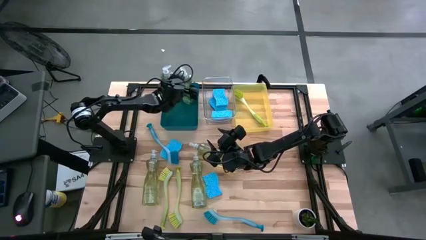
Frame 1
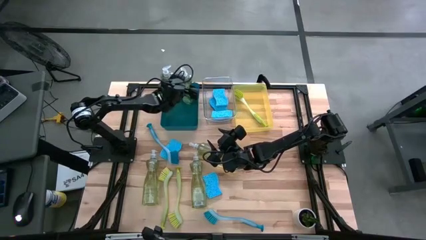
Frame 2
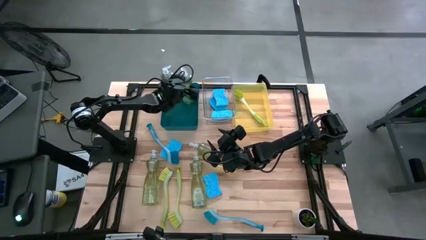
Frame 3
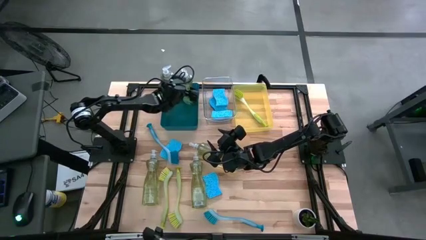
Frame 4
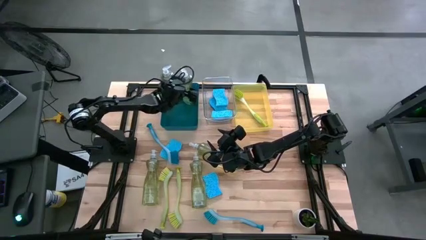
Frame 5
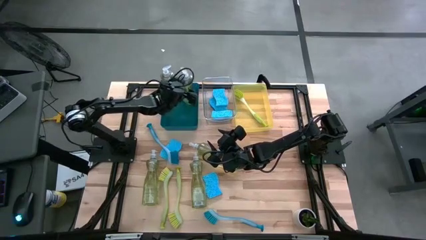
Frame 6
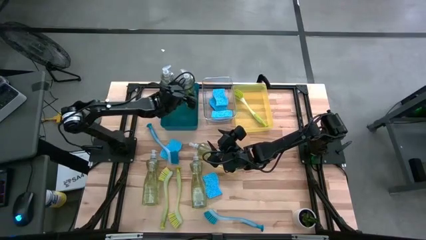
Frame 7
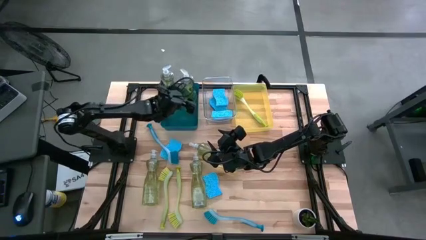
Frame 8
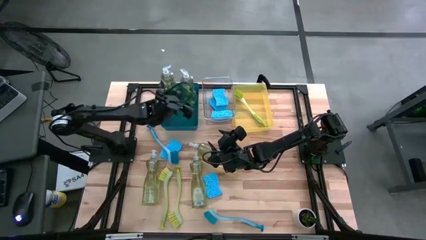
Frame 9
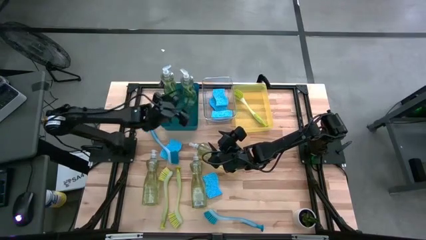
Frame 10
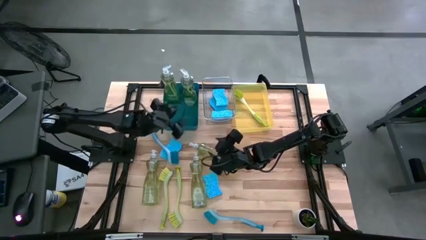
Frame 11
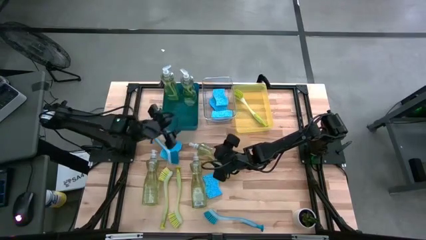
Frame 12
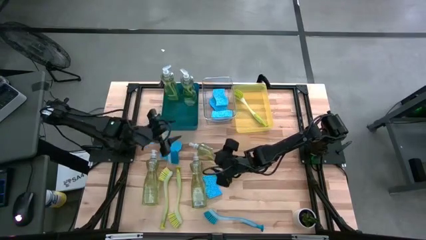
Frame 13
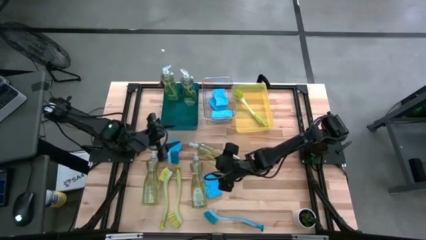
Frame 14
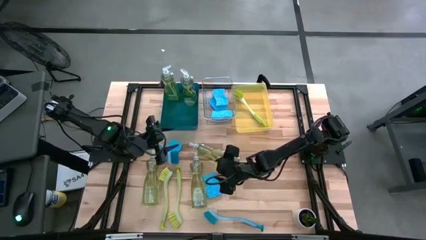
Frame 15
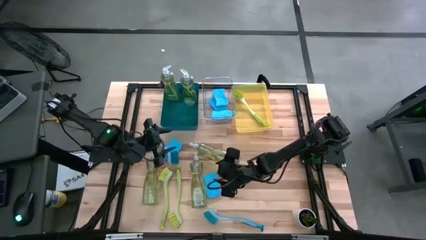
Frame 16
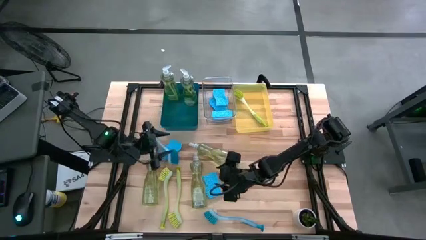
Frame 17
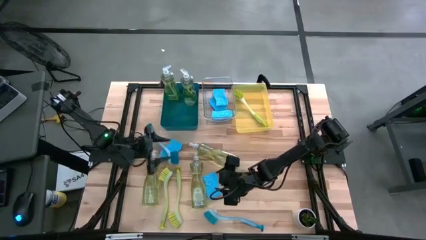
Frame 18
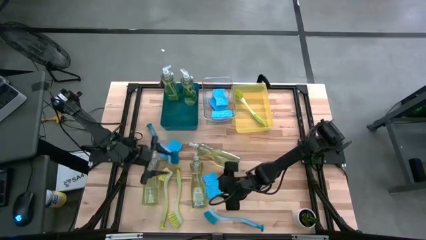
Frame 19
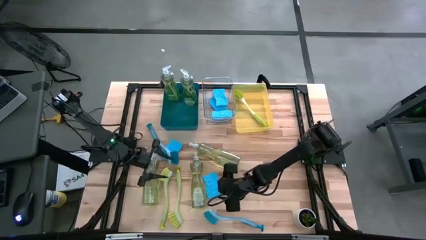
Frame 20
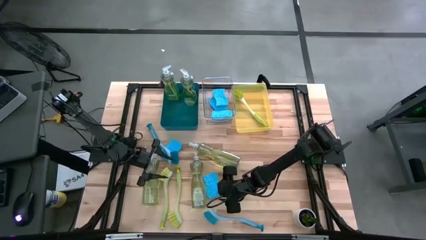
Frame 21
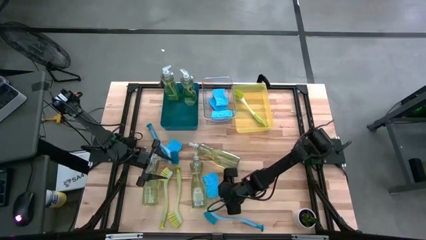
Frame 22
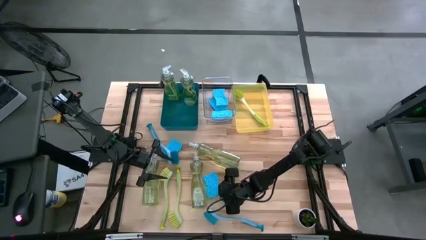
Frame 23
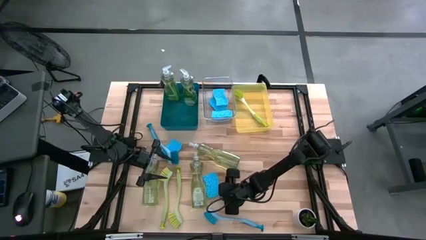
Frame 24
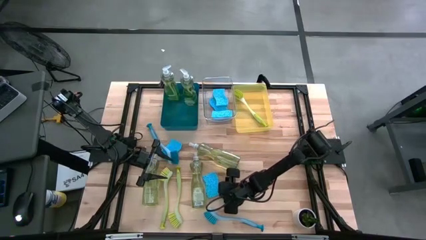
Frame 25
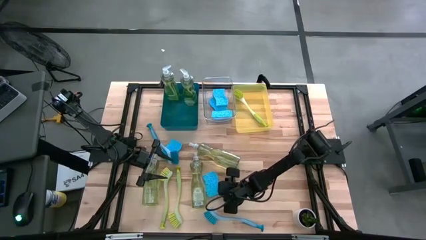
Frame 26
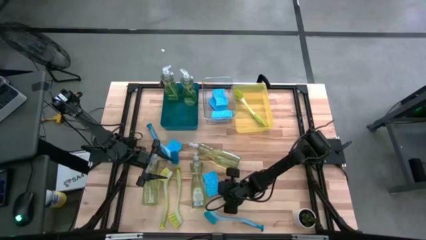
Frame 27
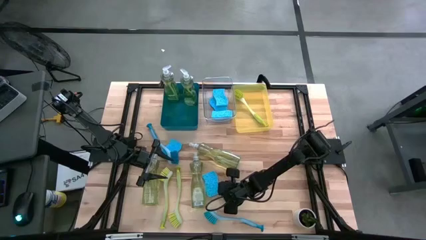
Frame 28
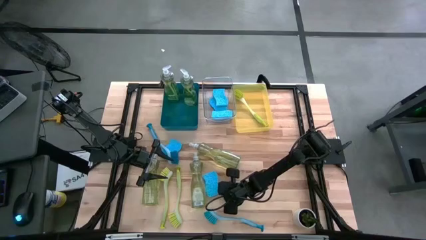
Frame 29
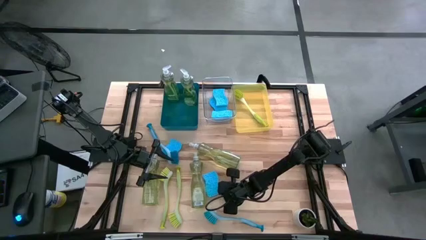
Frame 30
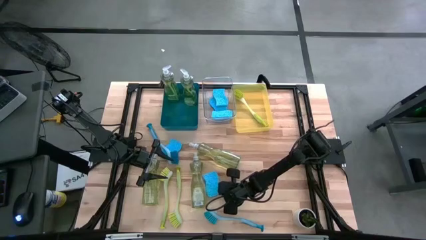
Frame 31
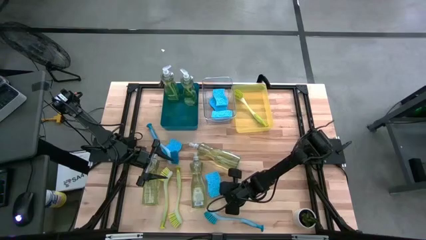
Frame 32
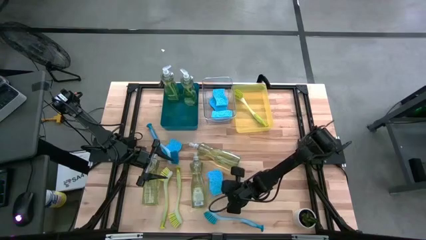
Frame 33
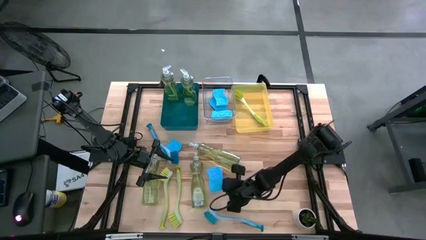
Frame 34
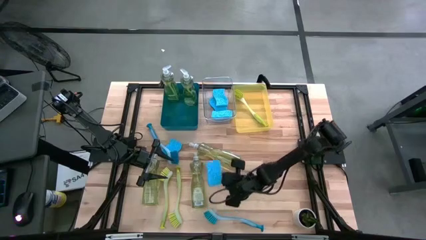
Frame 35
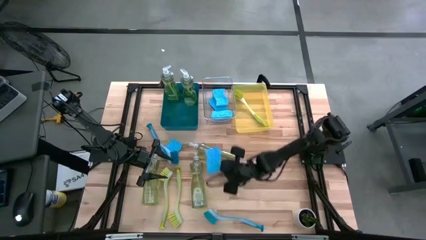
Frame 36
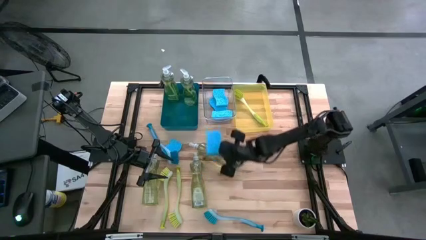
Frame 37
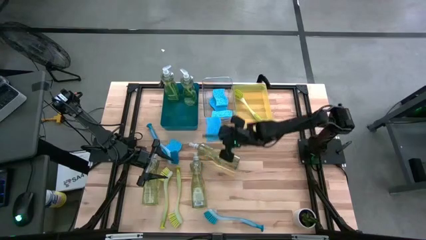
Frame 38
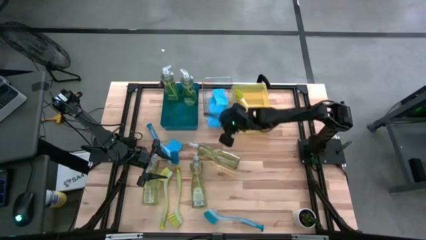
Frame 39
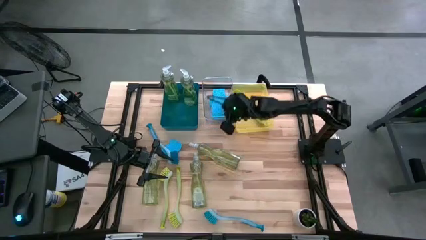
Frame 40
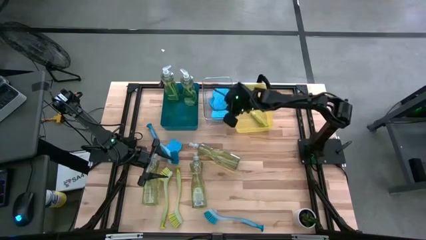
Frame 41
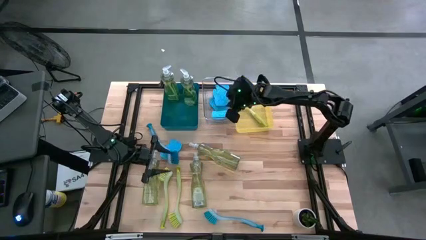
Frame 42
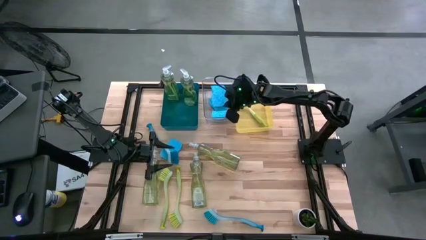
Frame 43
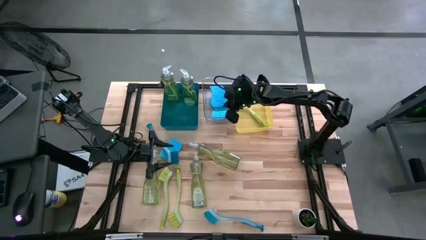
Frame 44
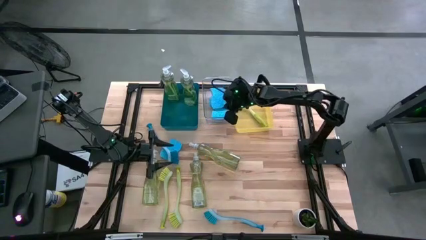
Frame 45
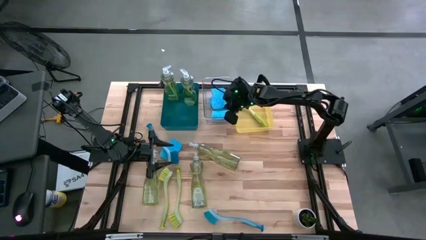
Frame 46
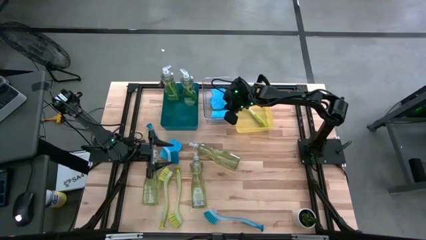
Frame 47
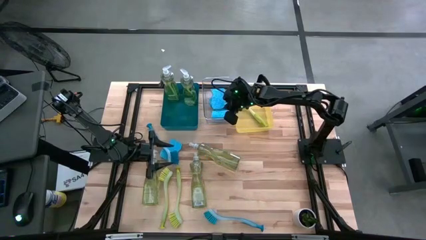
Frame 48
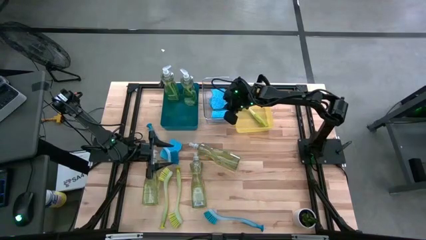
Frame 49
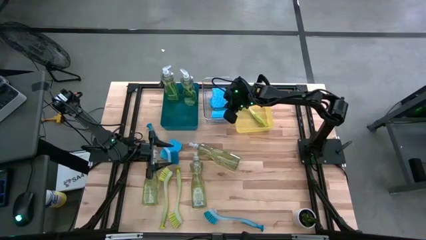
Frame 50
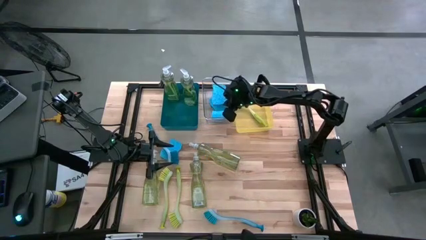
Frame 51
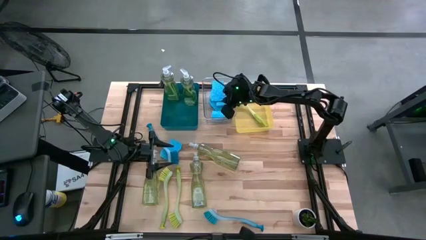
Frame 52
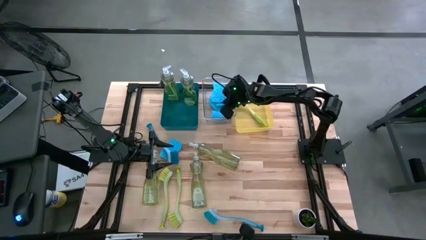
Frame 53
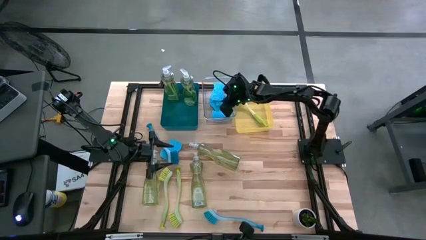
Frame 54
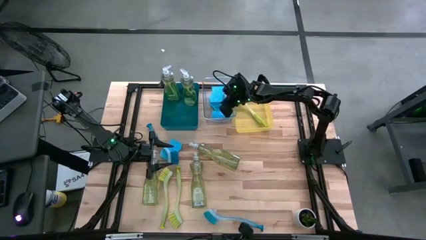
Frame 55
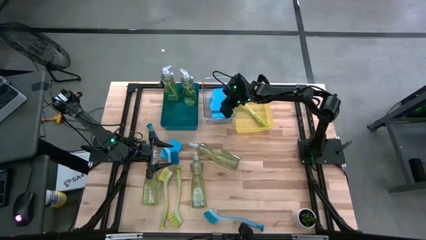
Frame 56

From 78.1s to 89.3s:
Task: Pick & Place Kitchen Sink Supplies
Put the blue sponge into the transparent bin

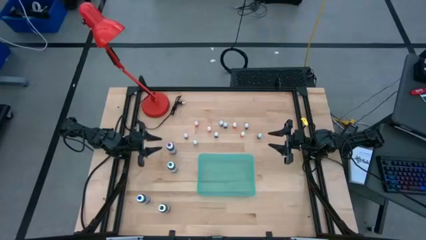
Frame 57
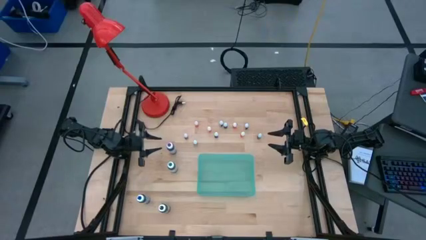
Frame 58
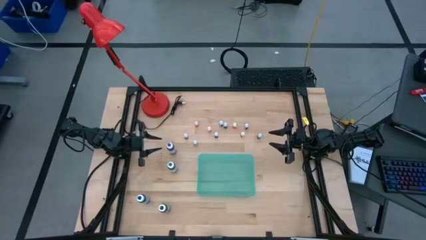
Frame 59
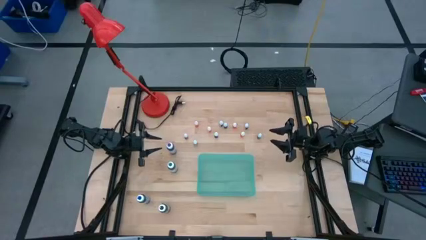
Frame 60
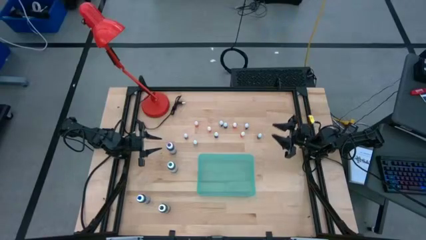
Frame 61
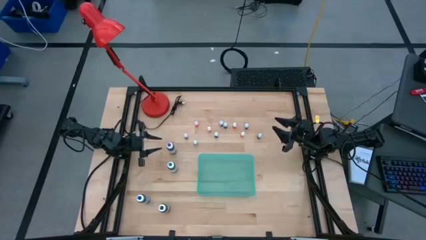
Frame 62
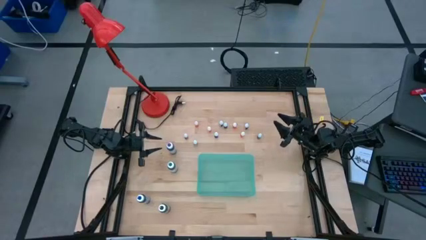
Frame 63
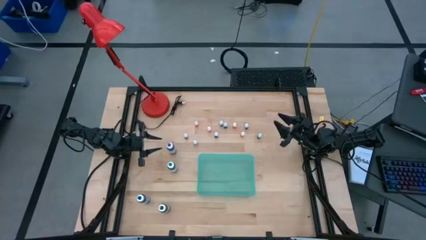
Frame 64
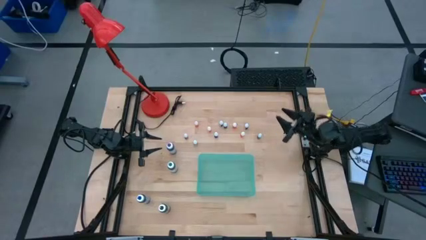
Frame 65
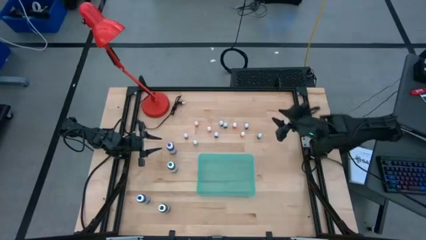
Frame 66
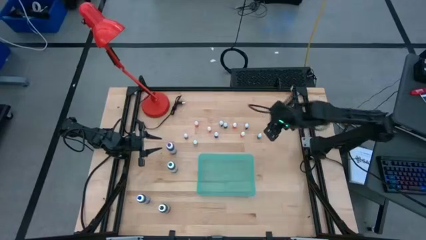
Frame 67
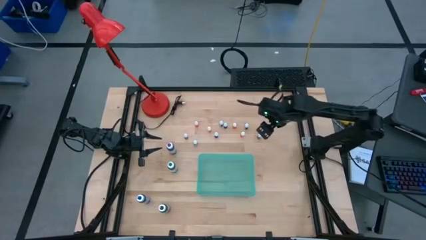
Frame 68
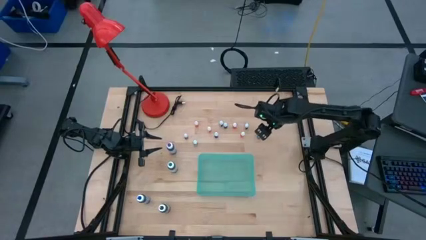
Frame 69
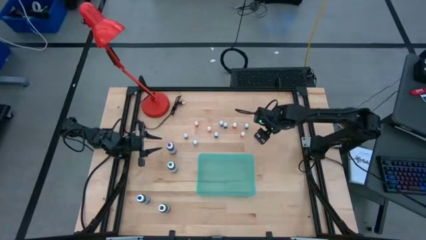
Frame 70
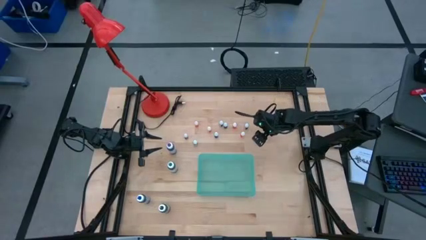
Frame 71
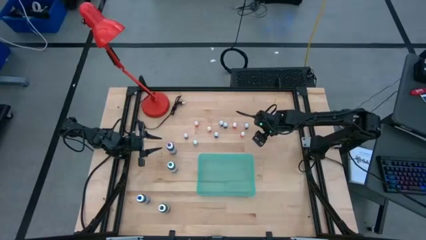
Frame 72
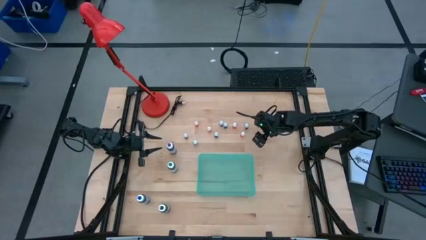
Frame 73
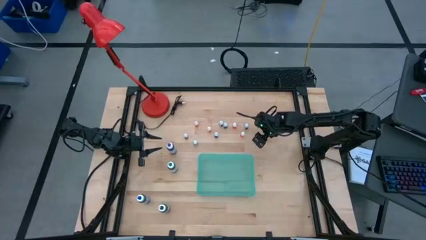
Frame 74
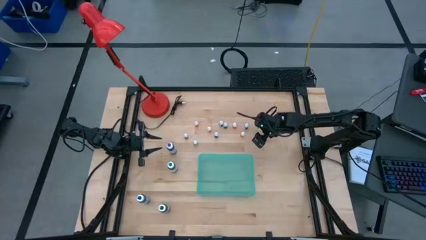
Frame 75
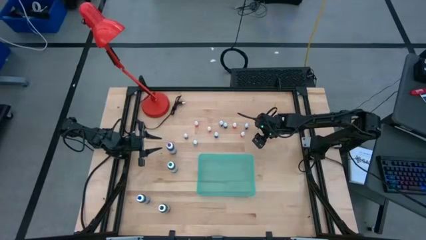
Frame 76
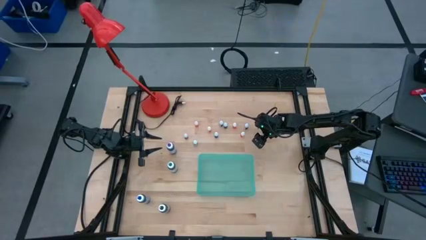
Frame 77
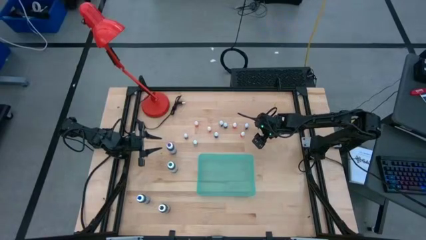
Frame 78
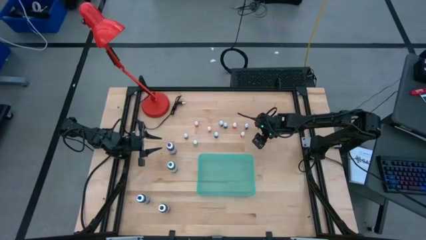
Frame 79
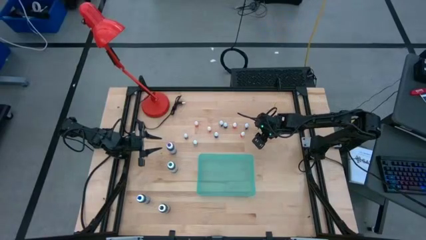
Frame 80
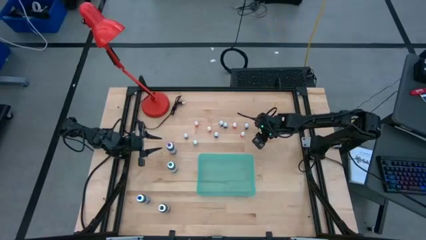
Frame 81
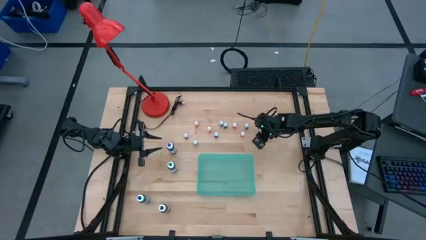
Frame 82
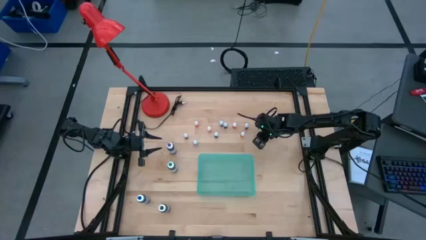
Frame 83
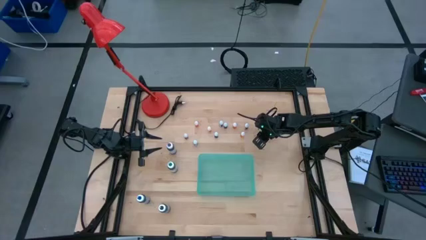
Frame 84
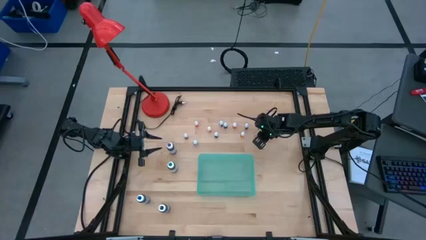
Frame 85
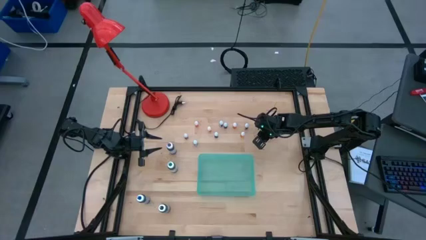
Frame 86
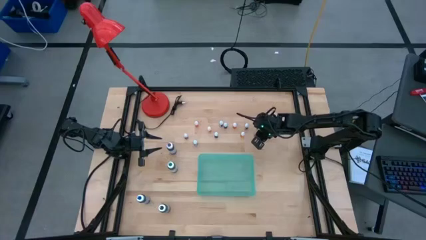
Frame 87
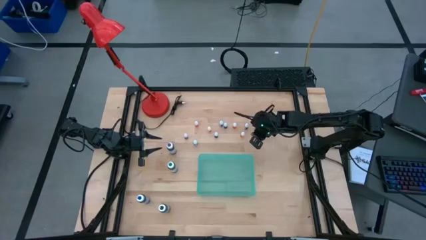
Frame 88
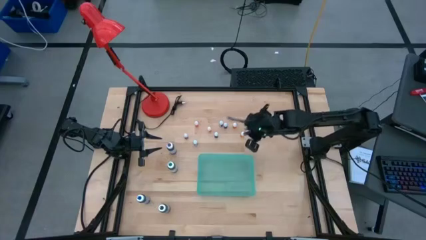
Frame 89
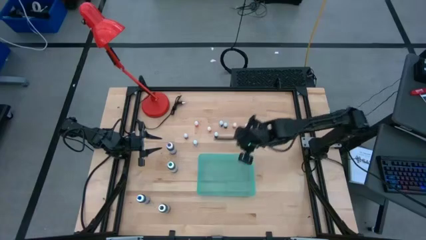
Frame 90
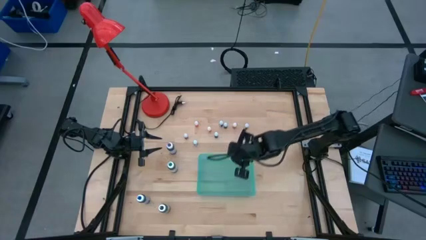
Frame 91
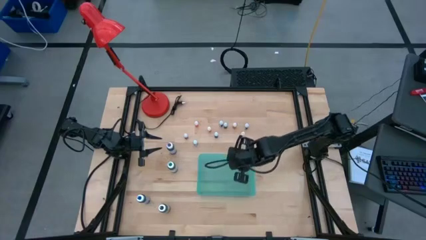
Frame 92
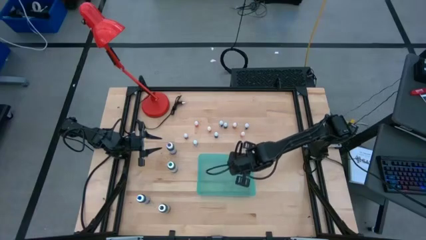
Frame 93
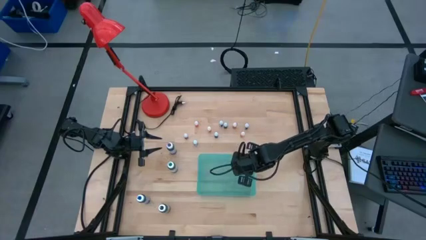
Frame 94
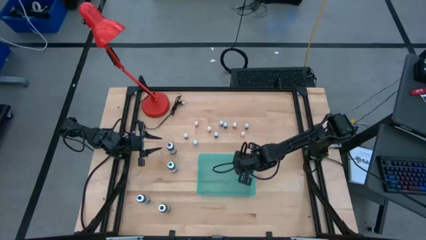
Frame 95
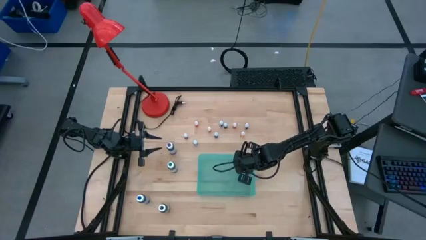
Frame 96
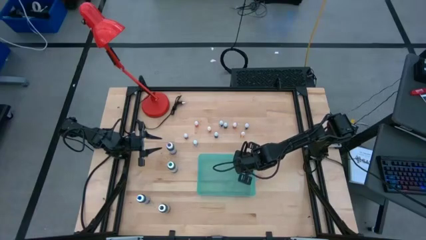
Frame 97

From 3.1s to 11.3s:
Task: Pick & Place food coloring
Put the small green food coloring bottle into the green bin
